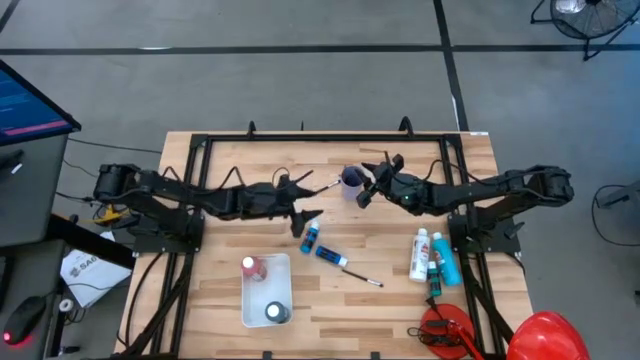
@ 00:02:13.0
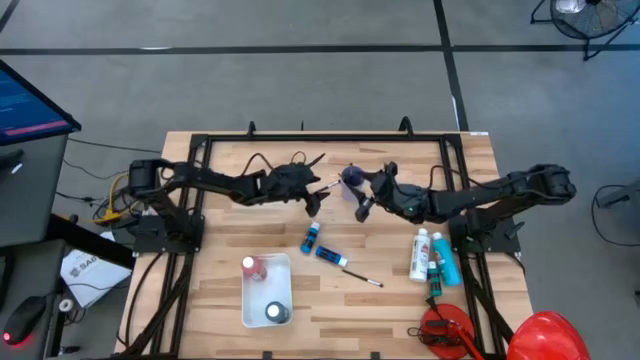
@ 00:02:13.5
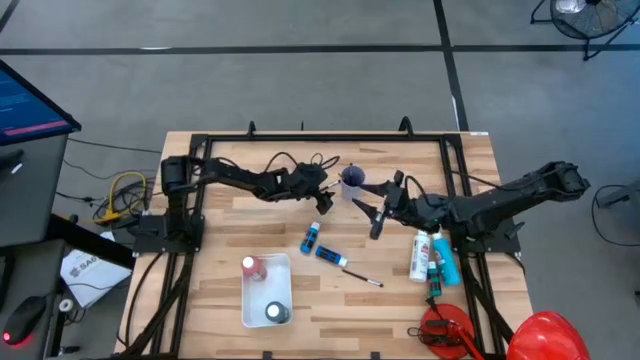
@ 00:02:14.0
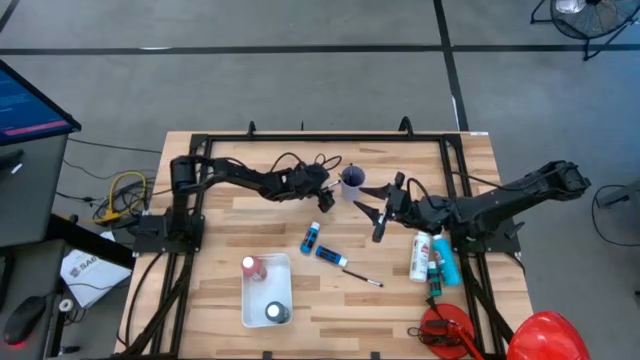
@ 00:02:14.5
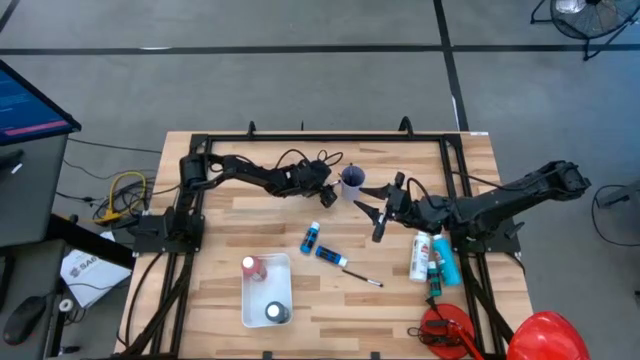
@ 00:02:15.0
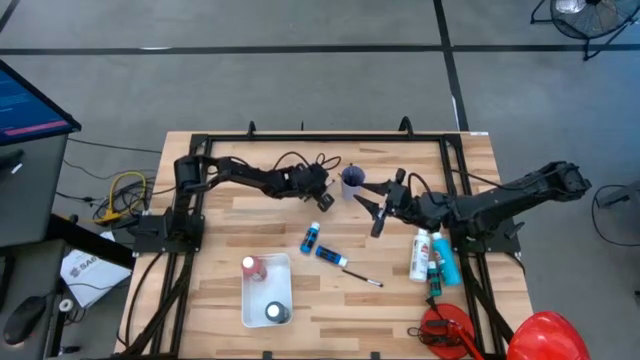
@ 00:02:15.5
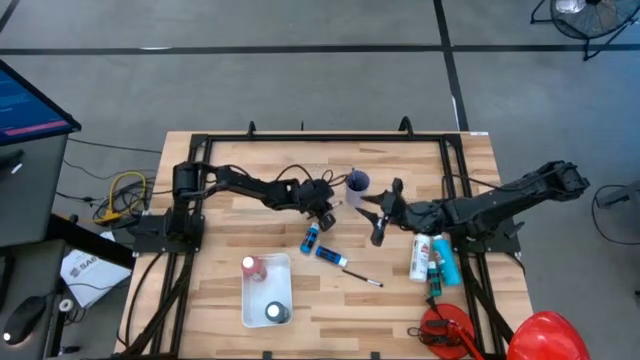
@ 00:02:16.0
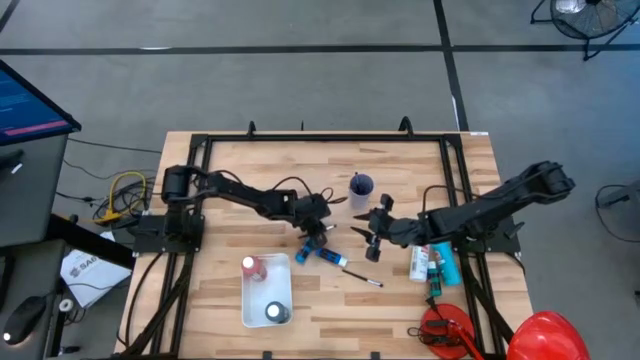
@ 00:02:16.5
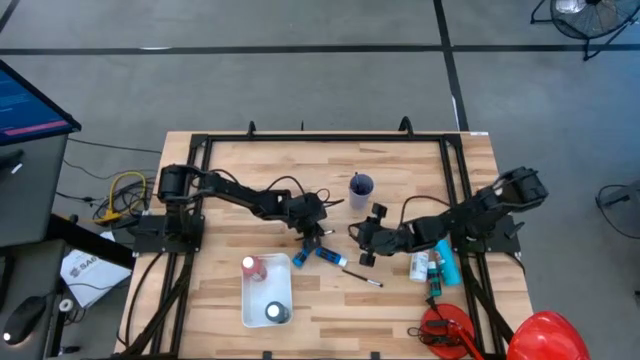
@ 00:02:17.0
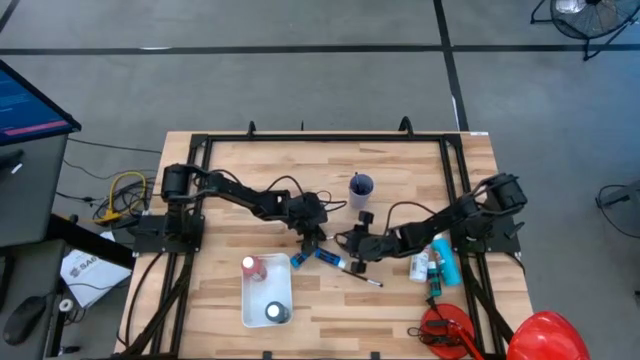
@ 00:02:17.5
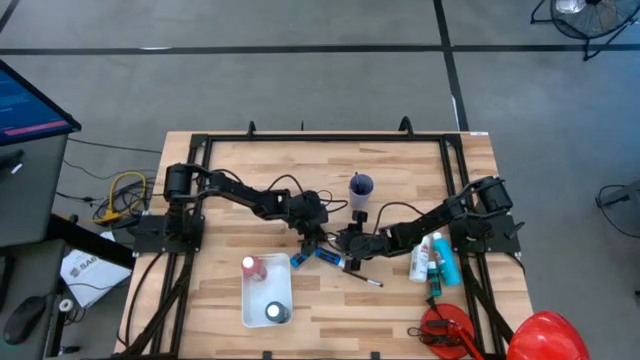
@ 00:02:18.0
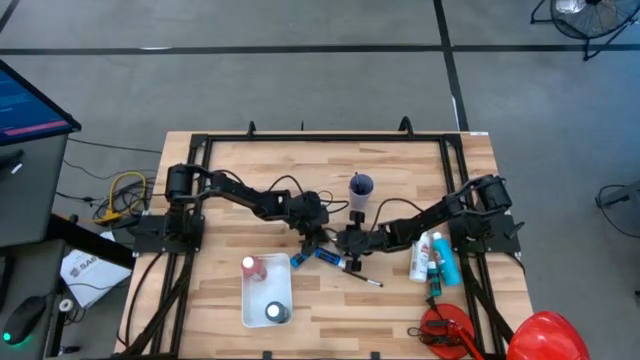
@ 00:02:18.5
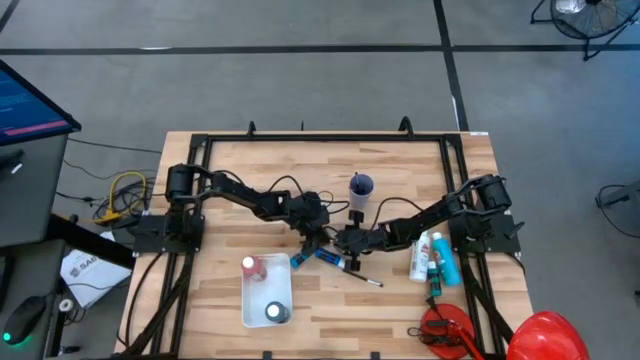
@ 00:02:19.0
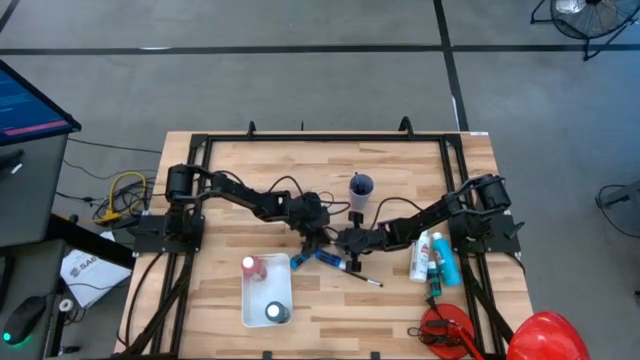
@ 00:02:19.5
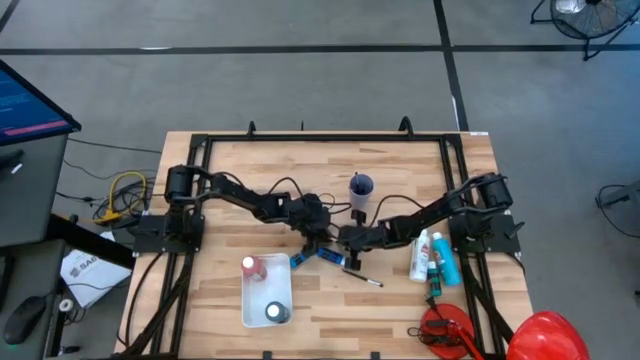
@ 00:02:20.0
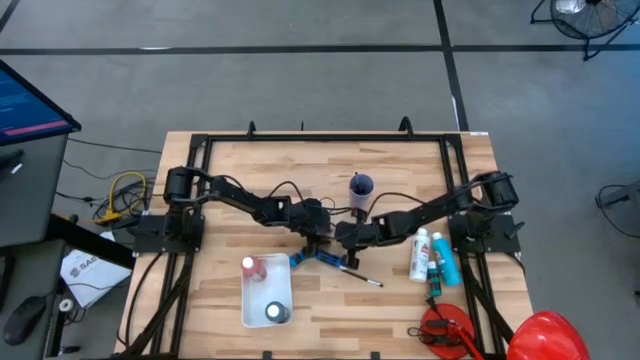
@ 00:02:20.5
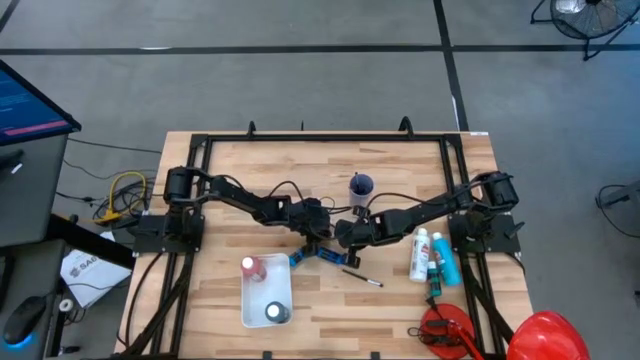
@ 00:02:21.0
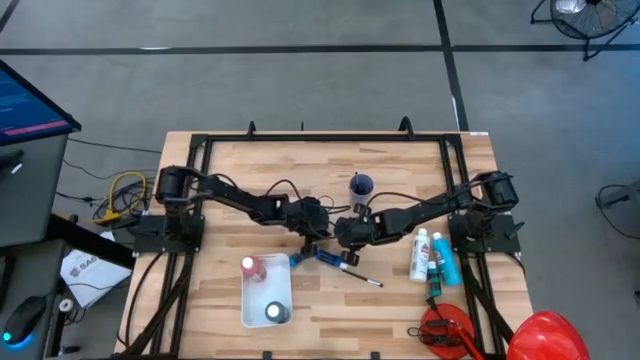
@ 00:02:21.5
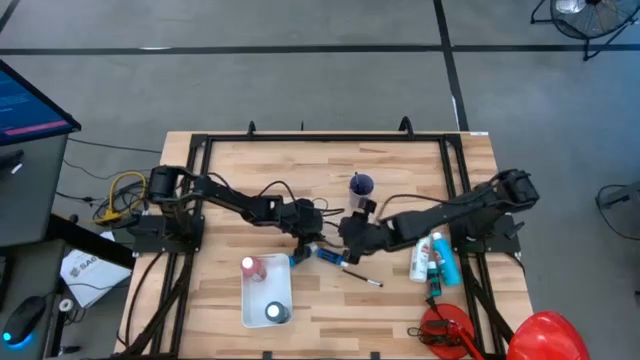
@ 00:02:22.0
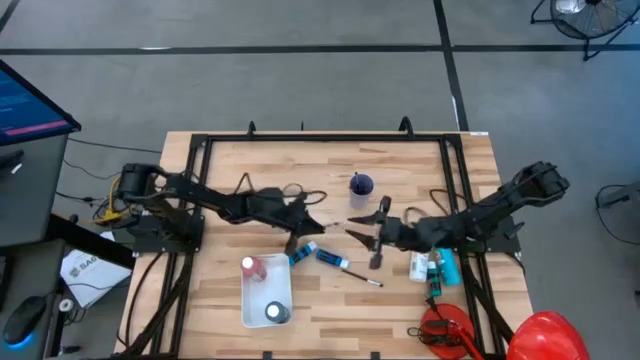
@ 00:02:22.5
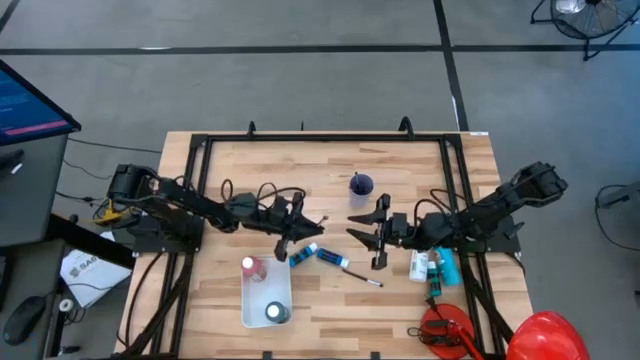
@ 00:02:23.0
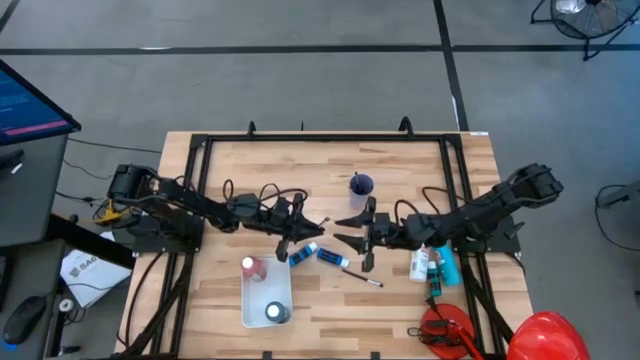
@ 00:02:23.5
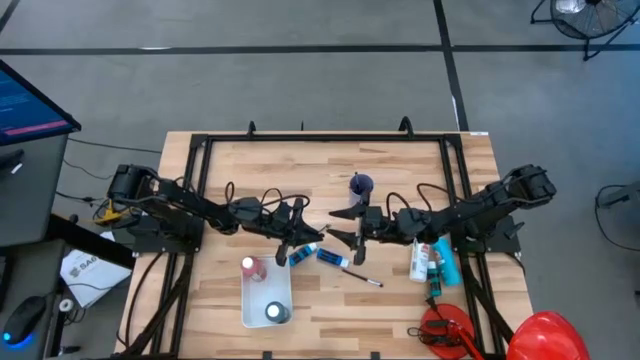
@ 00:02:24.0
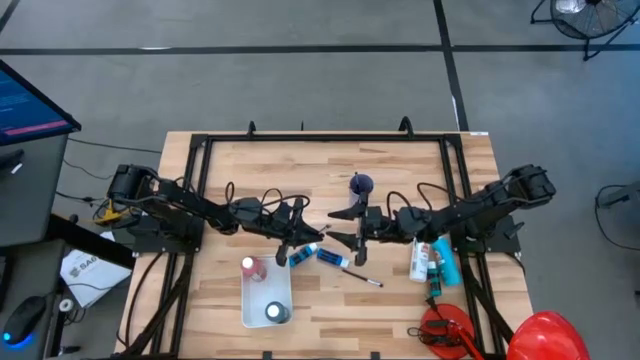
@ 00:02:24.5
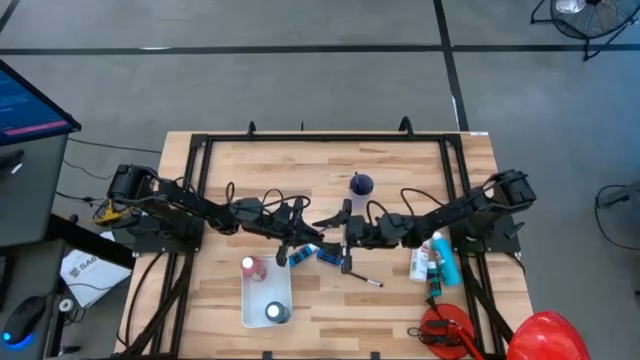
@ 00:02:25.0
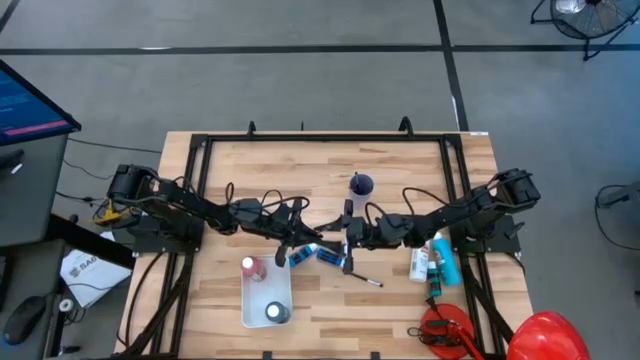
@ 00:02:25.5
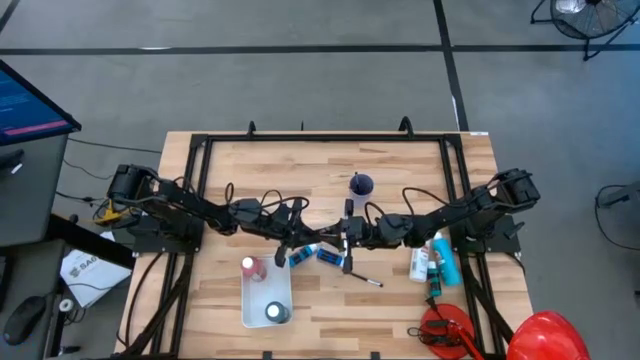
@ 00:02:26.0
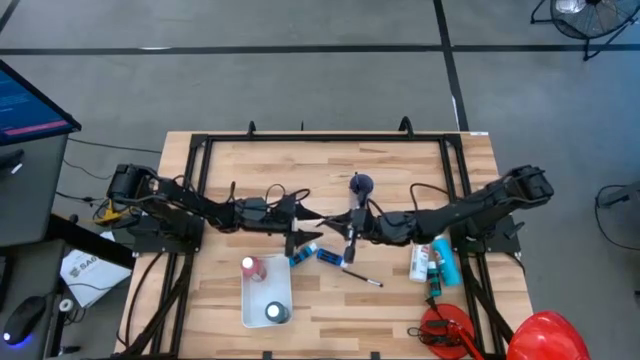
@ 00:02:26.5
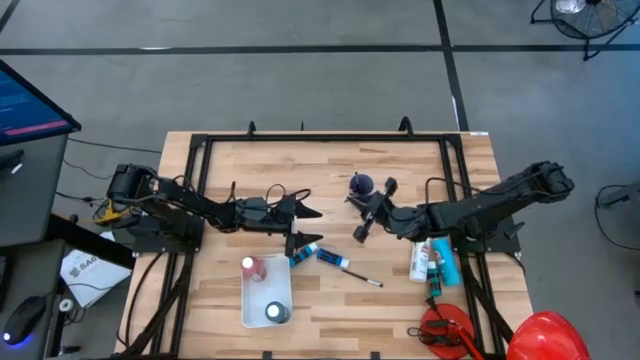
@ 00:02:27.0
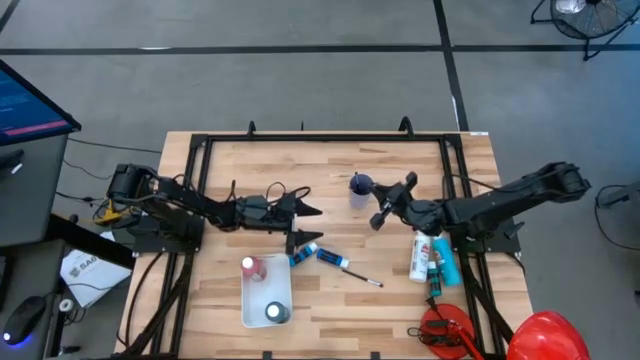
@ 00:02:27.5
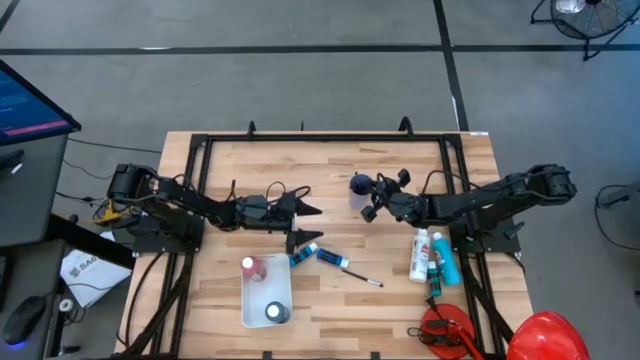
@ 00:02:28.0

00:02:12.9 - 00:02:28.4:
Task: Pick & Place Paint Supplies
Put the silver paint brush into the violet cup

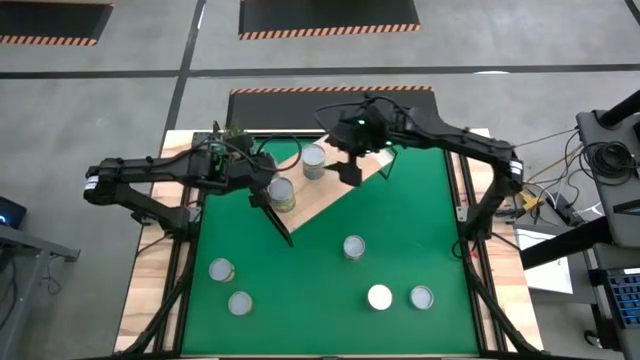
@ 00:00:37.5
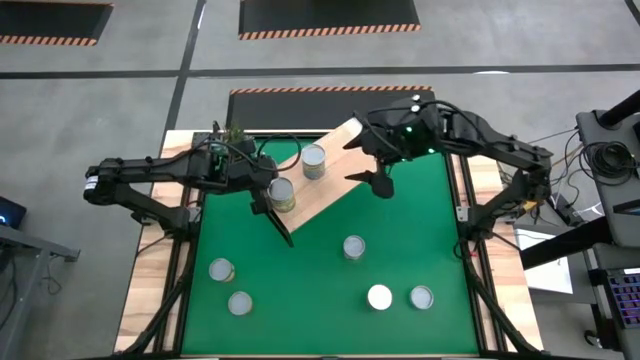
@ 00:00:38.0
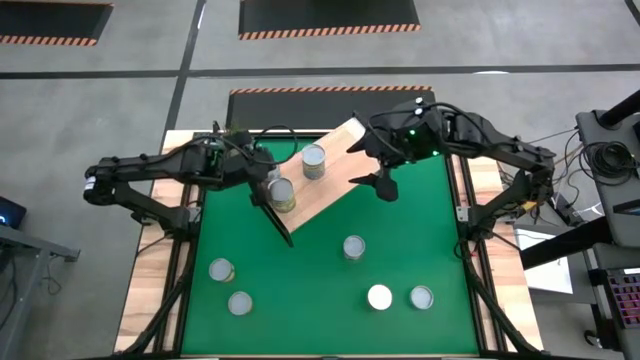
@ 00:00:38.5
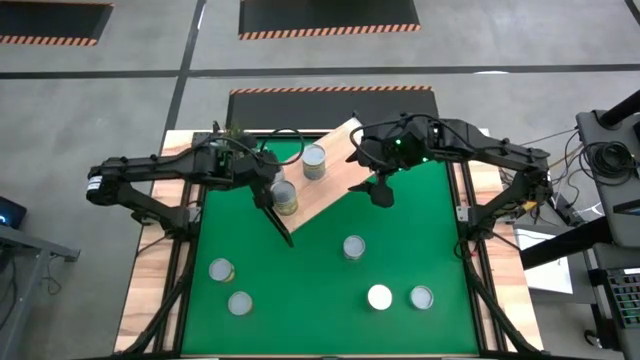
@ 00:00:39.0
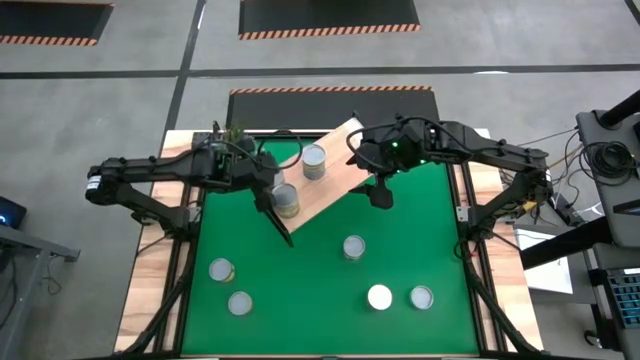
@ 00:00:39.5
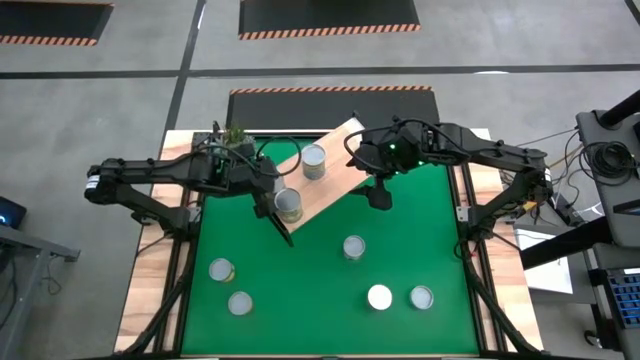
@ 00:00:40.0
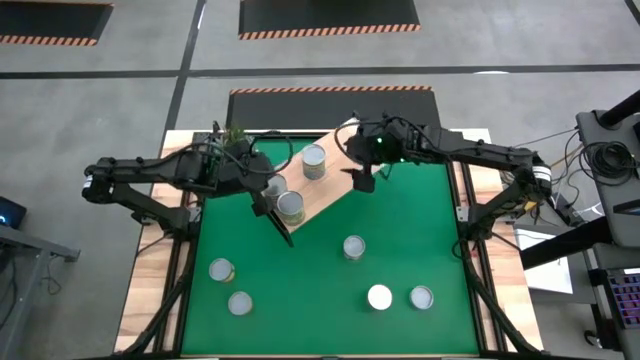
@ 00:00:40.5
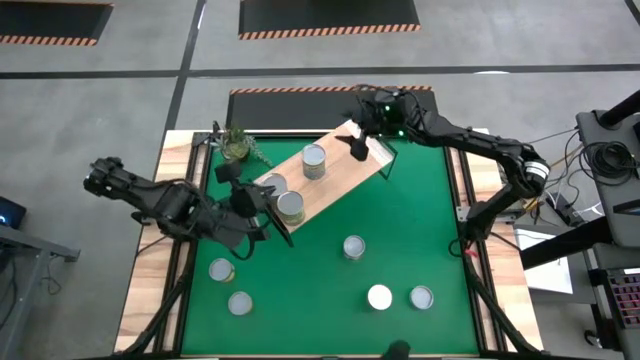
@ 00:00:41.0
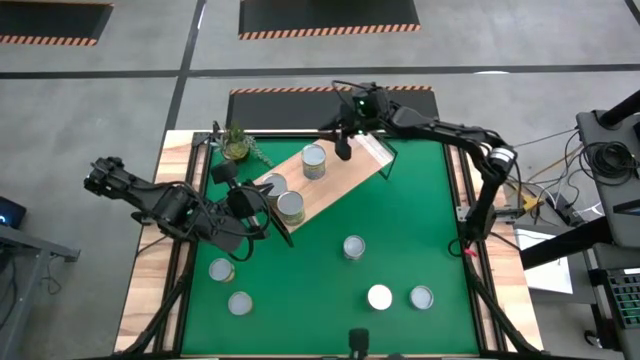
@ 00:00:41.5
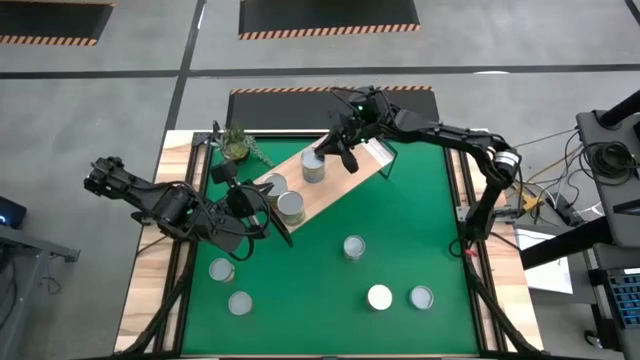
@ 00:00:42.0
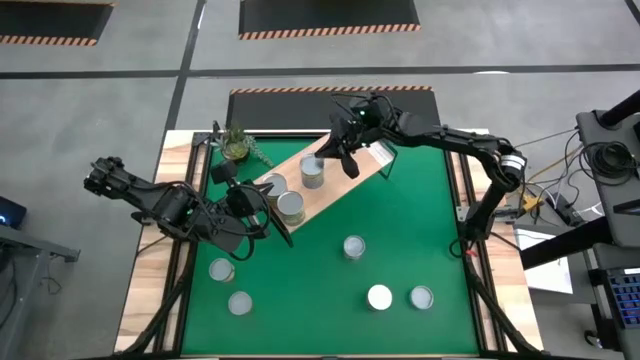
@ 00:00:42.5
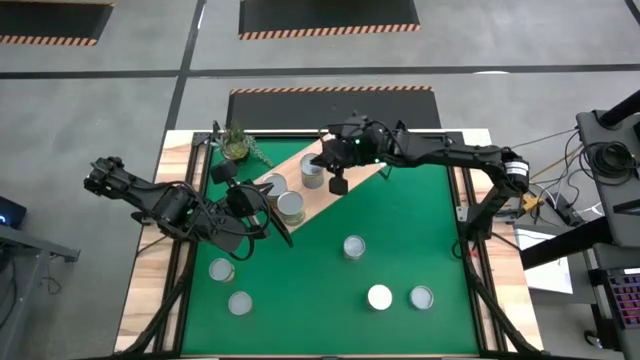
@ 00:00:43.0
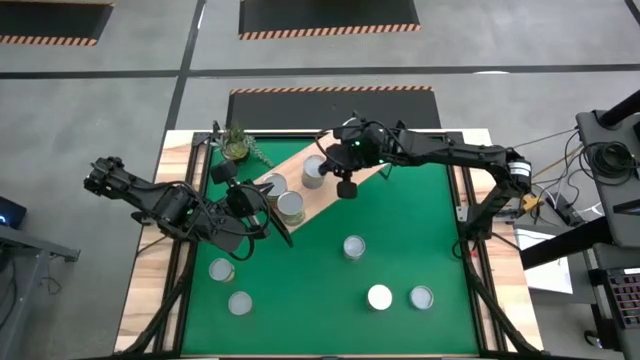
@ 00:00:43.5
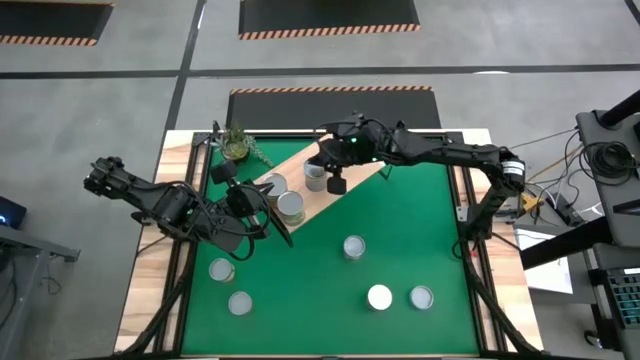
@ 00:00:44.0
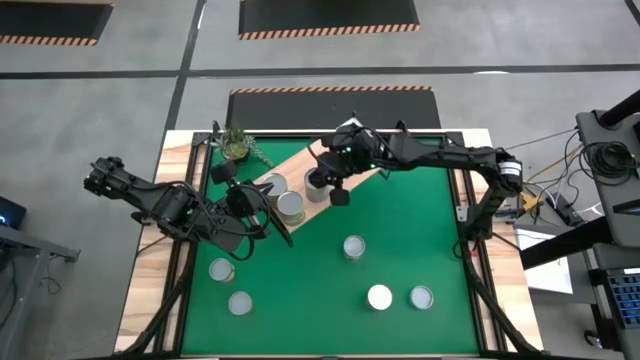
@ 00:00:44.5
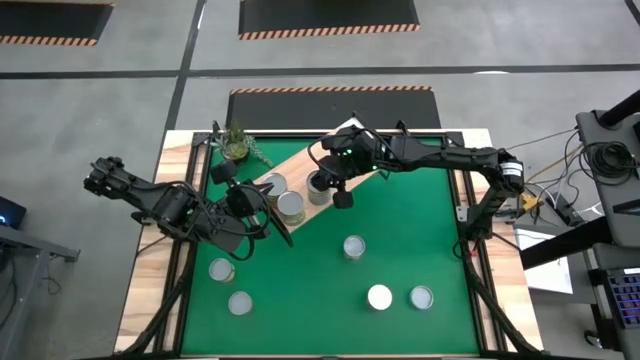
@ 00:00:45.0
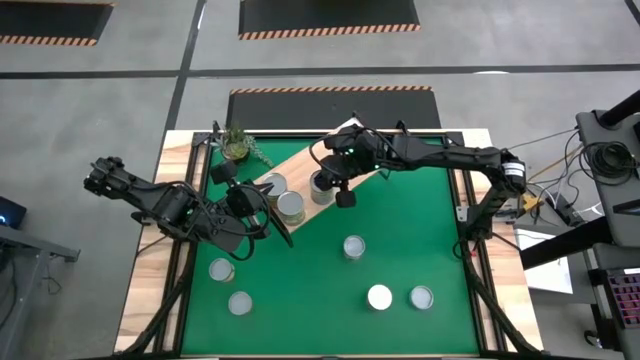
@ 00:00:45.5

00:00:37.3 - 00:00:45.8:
Task: Pick and place cans onto a shelf
Adjust the cans on the shelf
